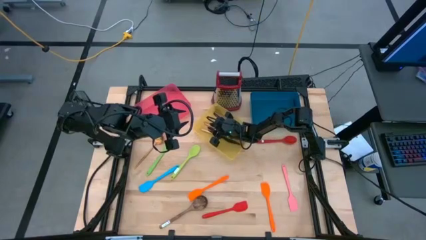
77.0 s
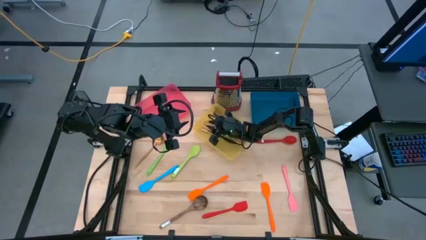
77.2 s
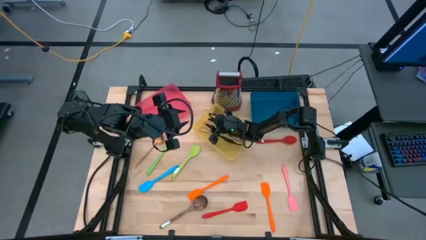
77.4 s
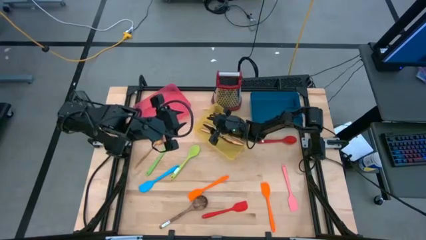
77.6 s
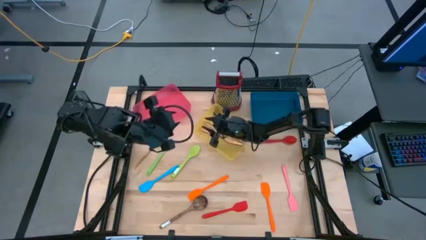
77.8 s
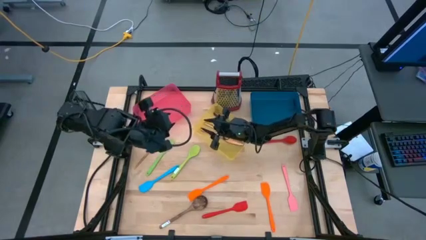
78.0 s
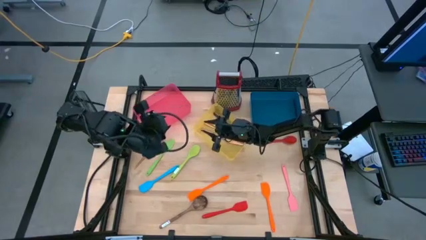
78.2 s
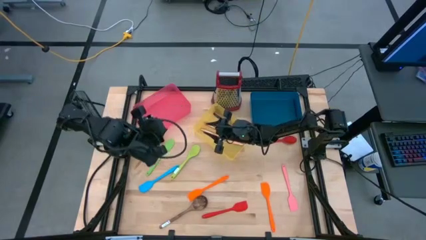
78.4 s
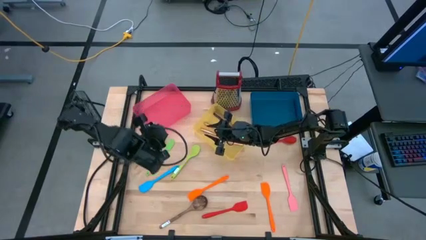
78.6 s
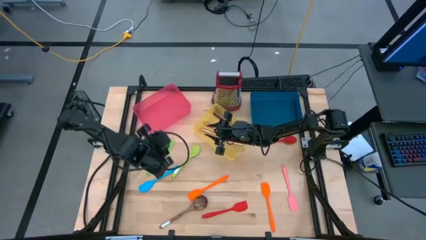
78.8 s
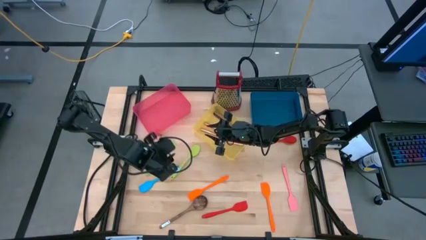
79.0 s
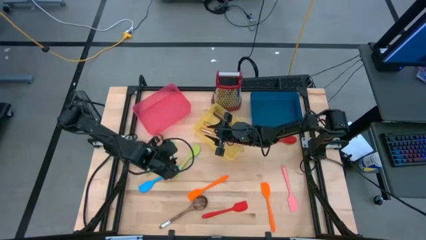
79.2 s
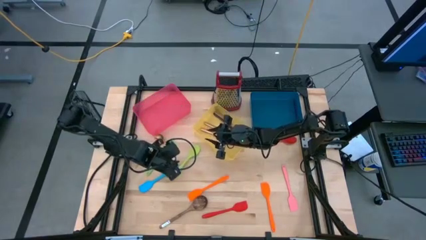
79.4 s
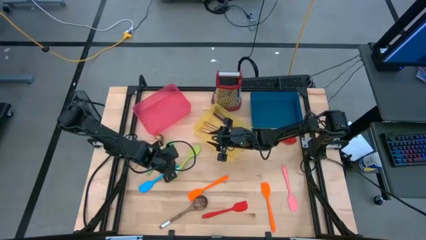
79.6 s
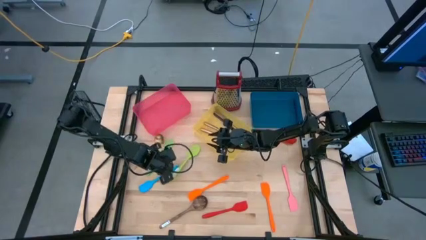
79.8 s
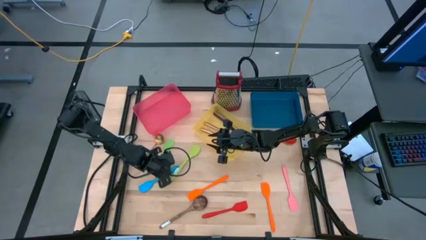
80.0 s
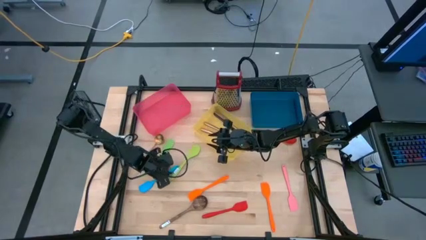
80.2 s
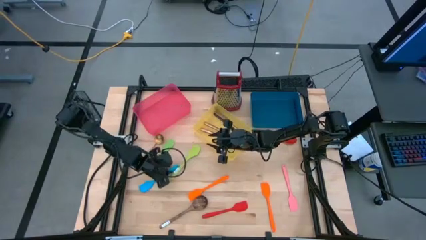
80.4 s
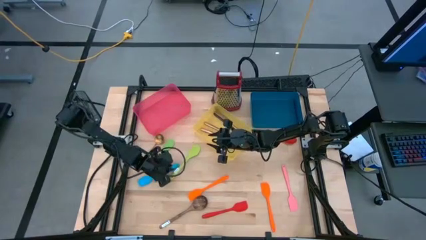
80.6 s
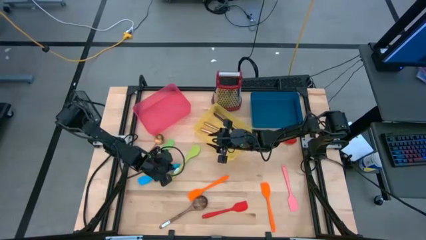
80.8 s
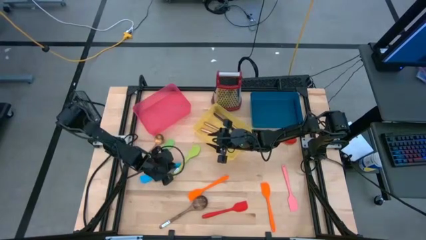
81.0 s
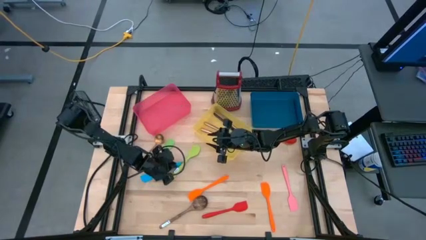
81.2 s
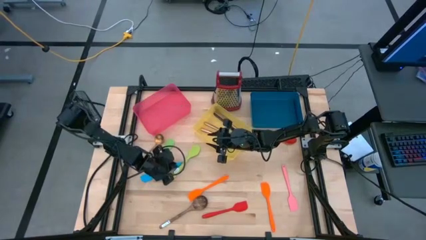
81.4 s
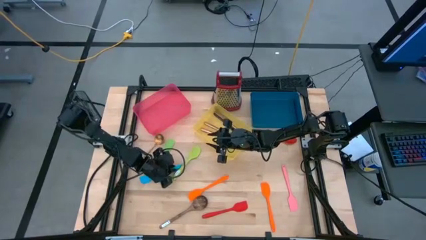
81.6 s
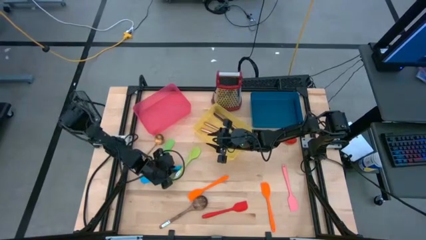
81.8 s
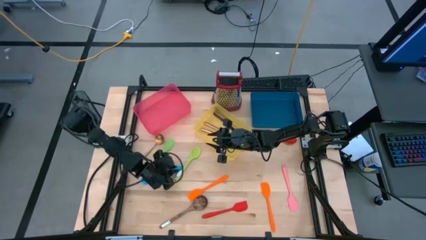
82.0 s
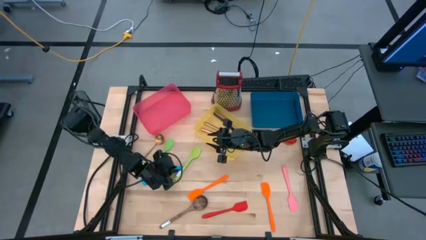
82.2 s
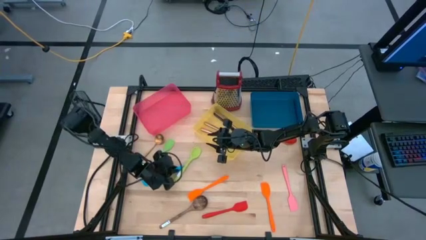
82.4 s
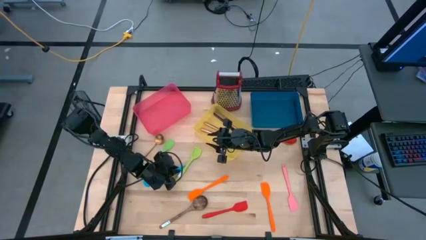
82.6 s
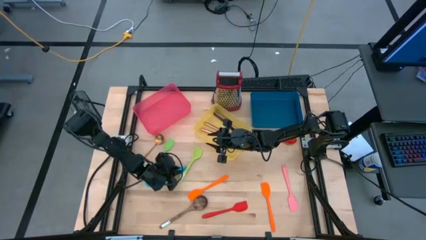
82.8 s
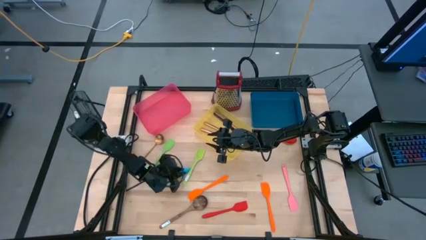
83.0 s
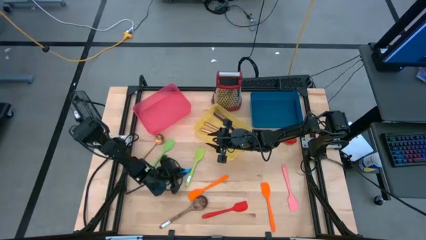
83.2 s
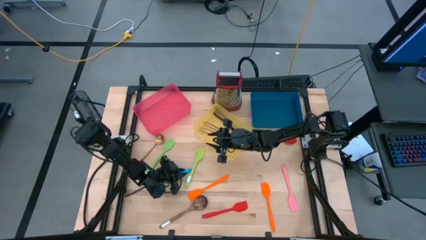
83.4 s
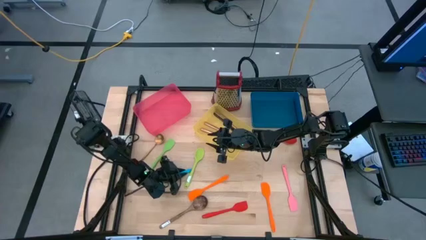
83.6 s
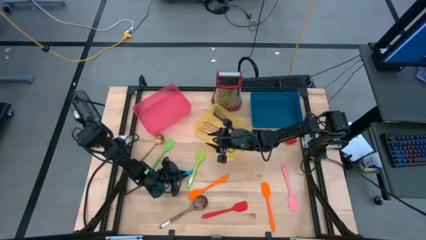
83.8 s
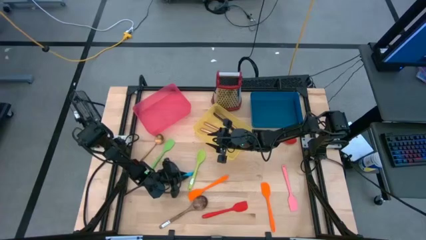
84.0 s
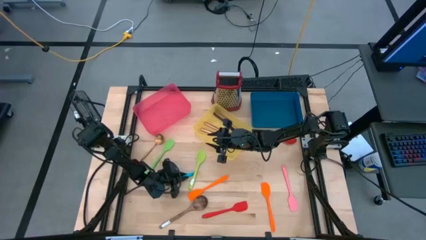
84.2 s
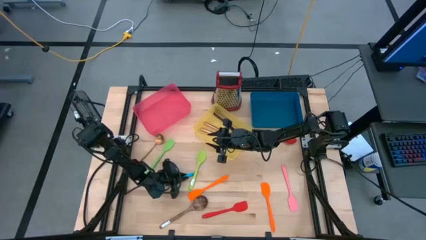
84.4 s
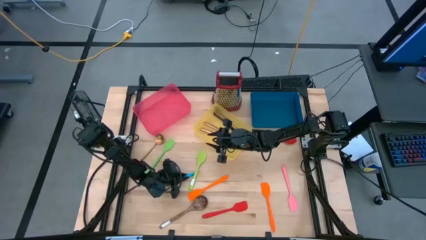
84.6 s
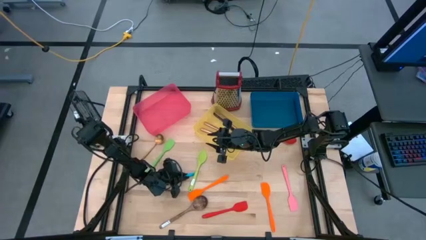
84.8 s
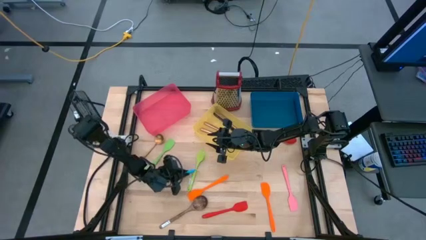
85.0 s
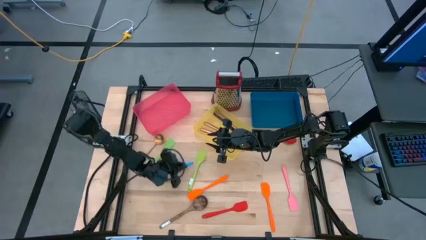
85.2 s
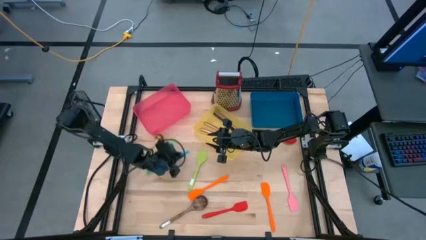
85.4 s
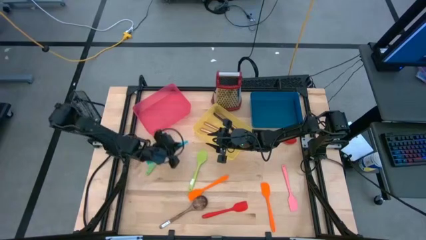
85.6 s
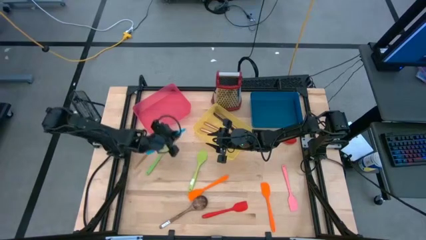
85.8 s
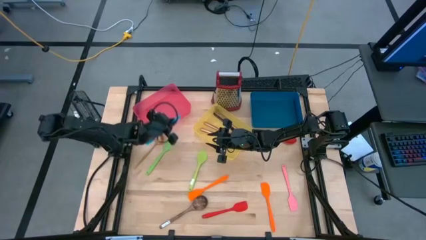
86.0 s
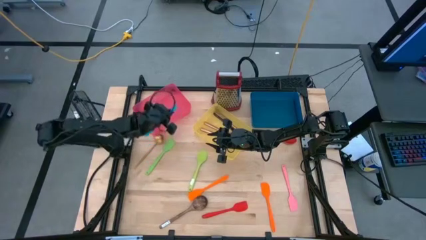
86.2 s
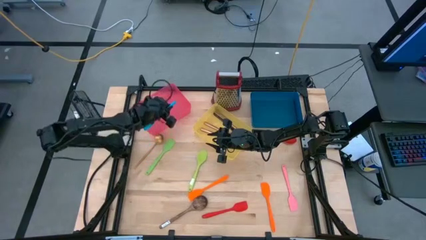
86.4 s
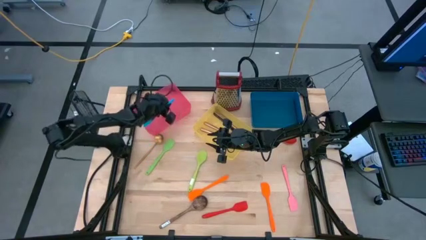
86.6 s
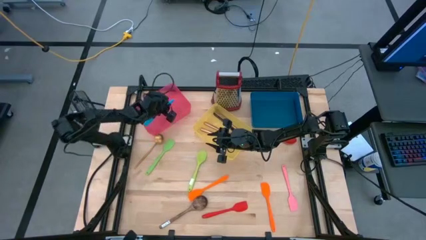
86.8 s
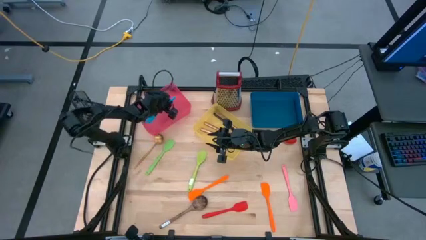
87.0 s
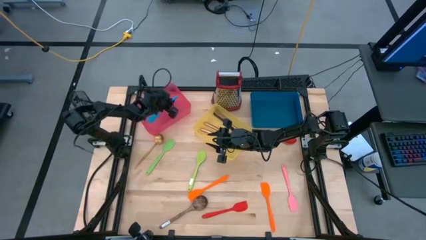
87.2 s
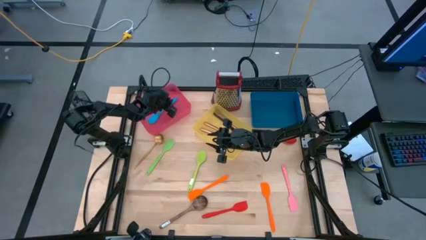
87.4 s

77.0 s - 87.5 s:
Task: Pick & Place Kitchen Items
Put the blue serving spoon into the red bin

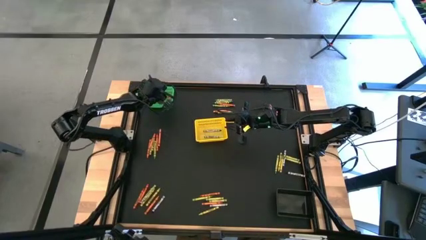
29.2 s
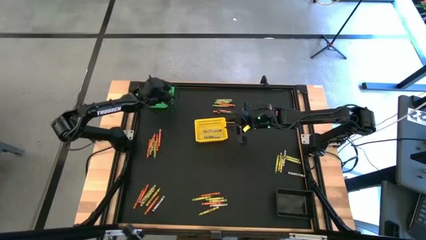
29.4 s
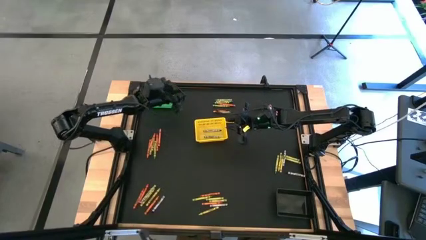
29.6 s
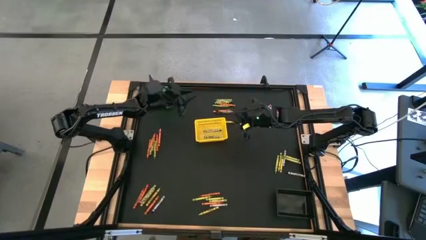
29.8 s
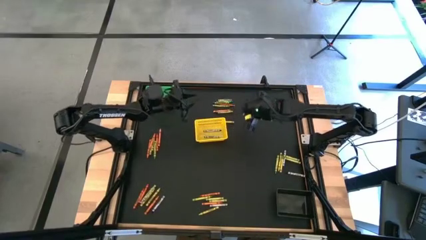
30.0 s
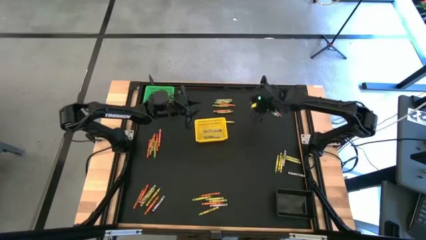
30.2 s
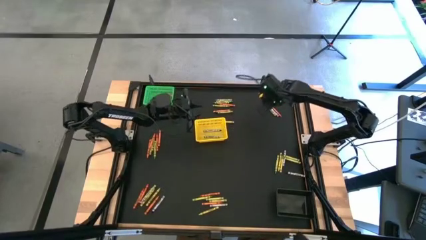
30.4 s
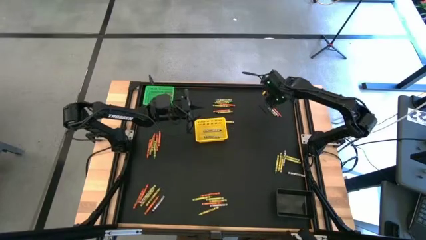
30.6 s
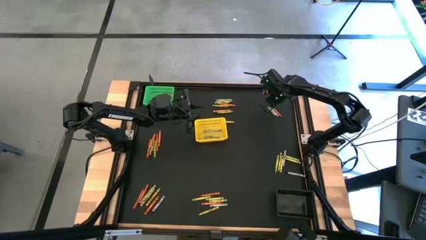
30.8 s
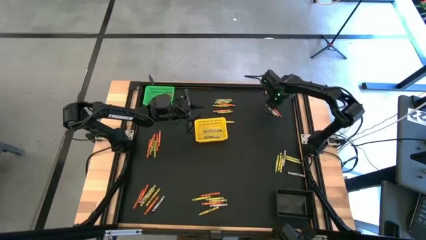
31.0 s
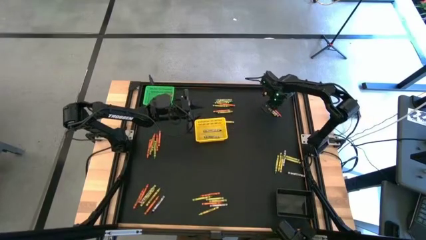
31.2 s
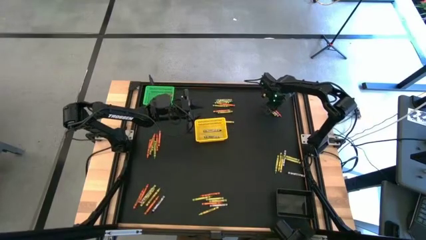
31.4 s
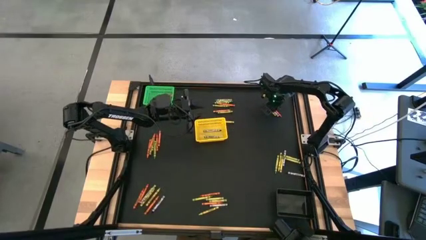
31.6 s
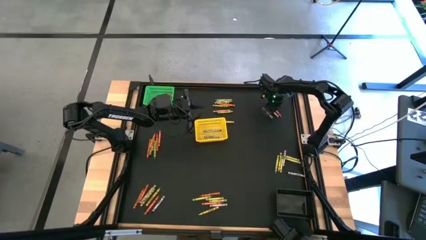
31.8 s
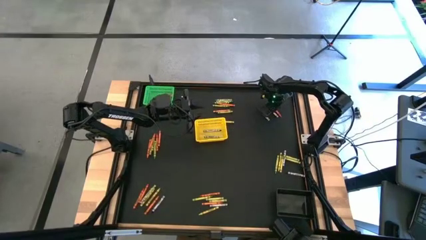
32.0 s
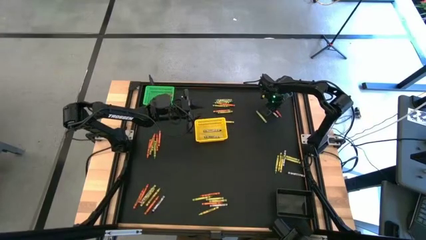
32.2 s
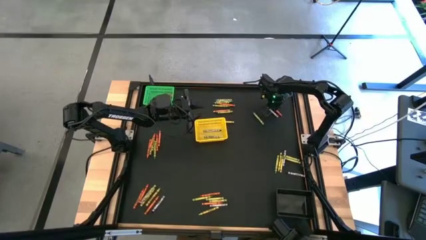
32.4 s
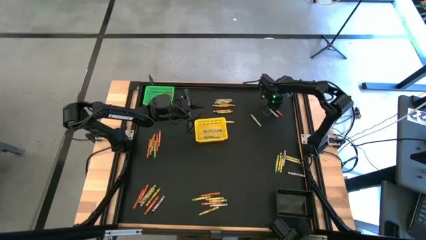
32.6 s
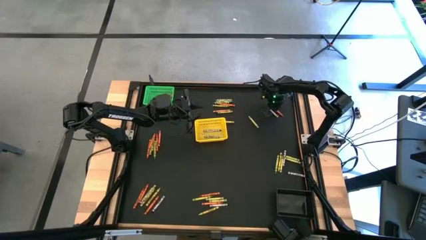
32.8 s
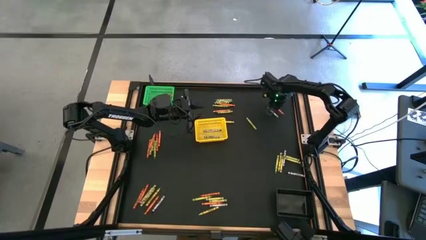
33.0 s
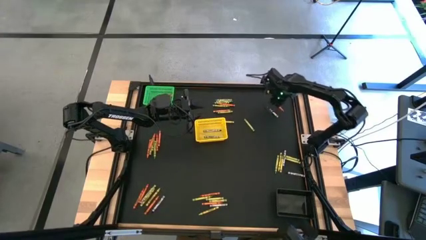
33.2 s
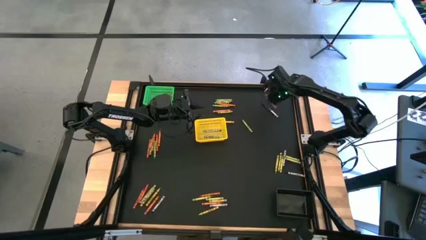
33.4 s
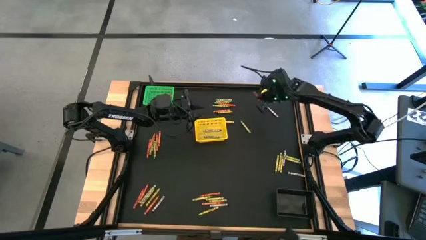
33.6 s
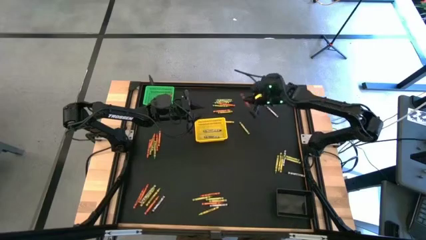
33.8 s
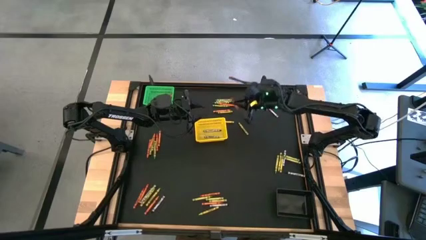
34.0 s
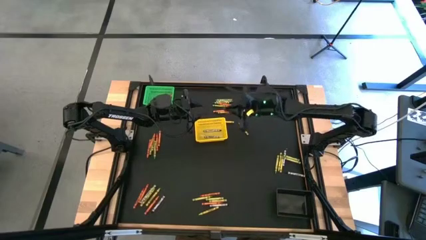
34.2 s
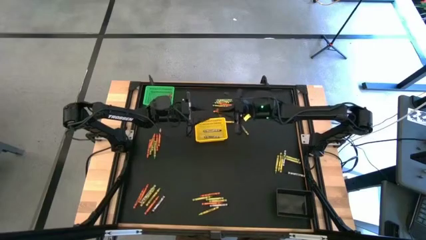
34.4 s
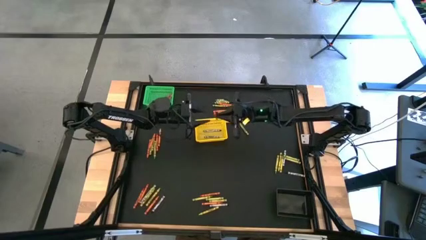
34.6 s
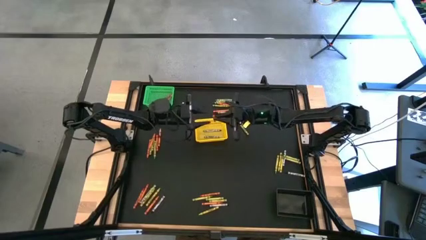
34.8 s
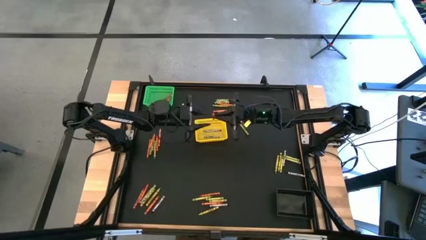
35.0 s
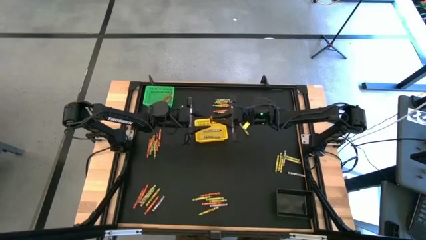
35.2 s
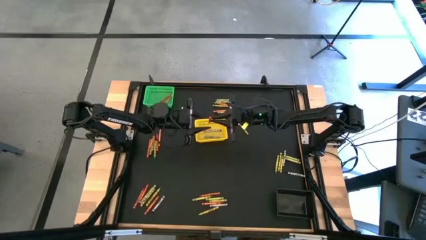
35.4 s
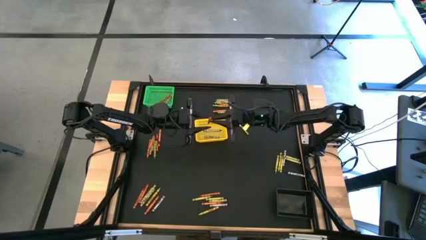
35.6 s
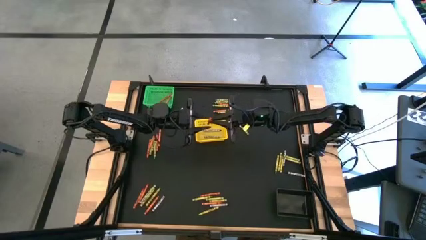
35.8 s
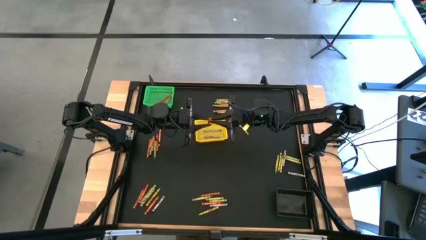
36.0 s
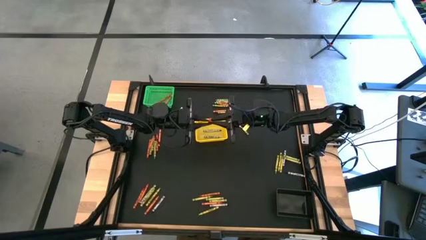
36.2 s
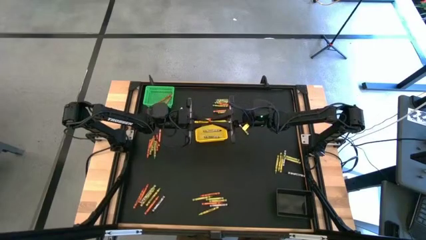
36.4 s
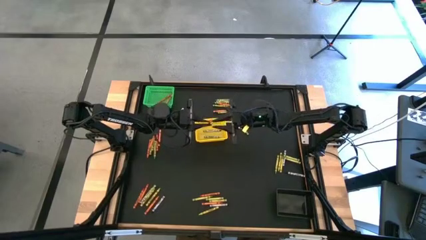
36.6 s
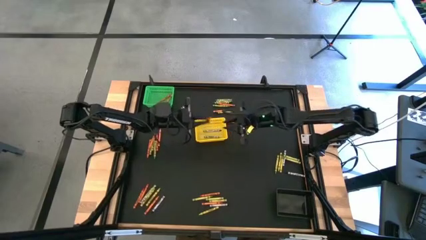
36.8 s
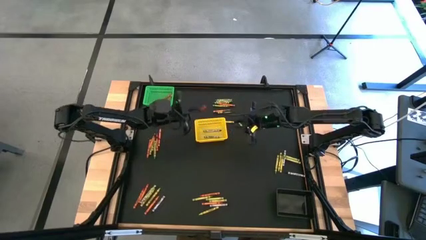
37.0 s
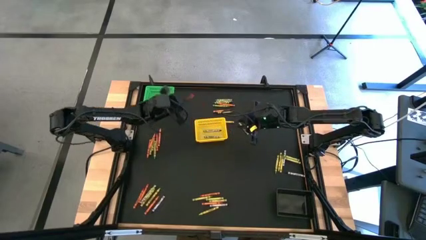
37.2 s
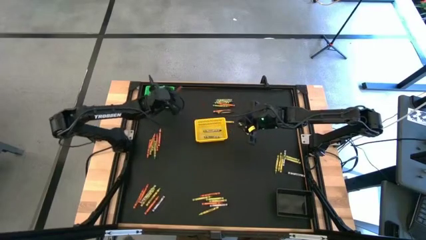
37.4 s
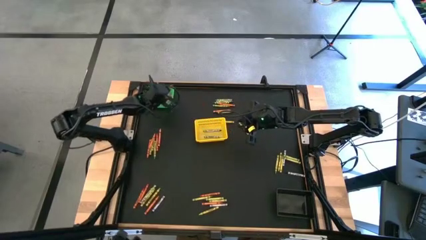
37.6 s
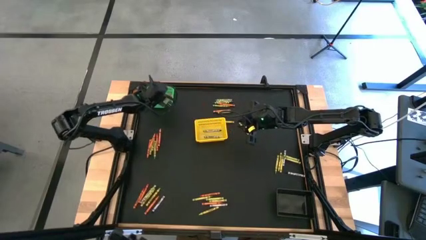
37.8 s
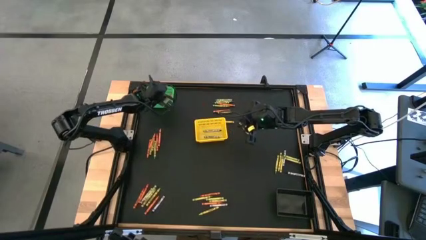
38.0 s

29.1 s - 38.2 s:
Task: Sort crayons
Put the orange crayon into the green bin
